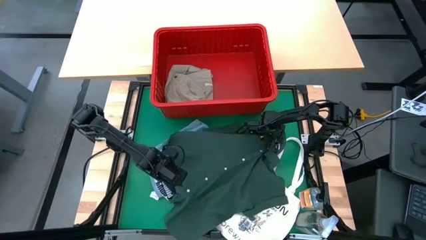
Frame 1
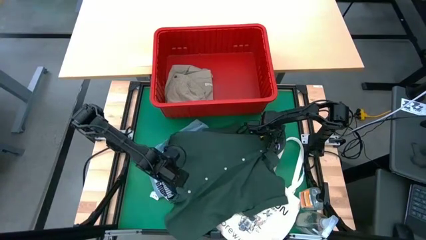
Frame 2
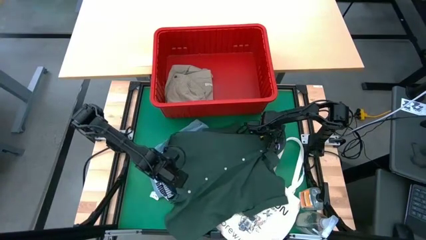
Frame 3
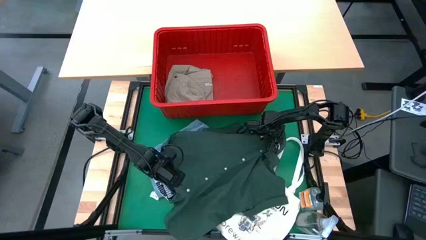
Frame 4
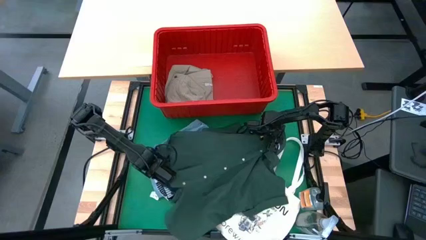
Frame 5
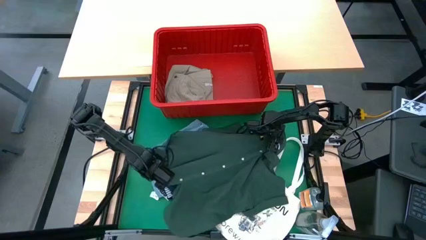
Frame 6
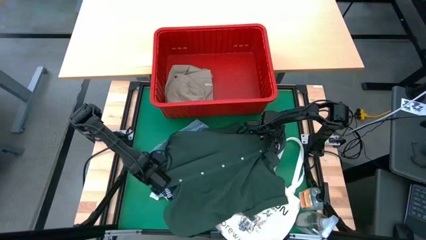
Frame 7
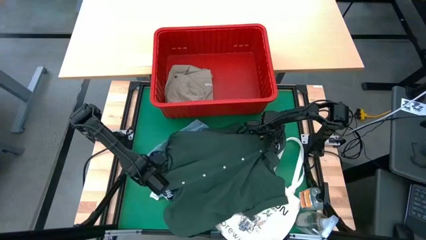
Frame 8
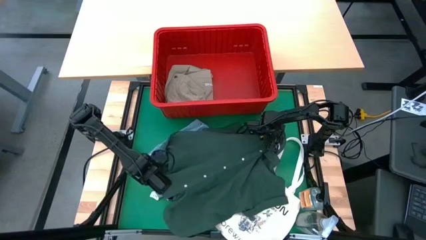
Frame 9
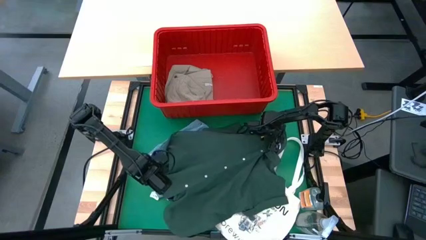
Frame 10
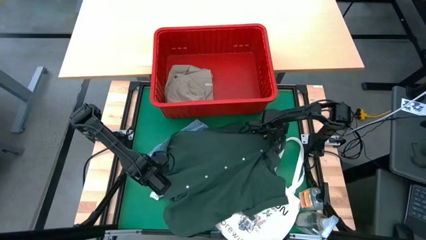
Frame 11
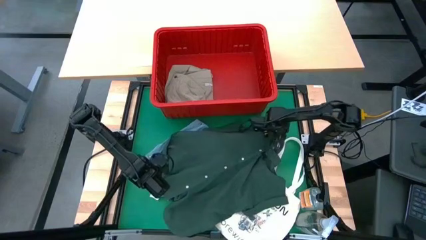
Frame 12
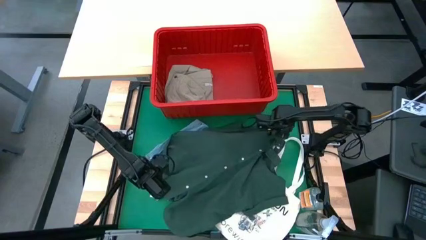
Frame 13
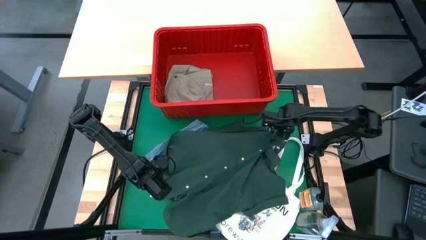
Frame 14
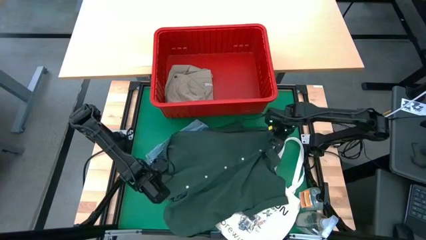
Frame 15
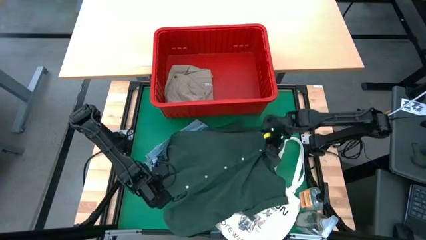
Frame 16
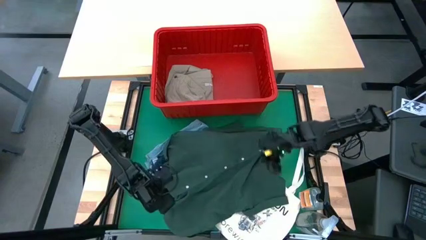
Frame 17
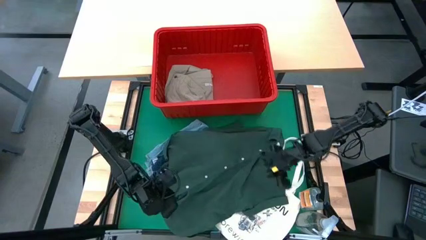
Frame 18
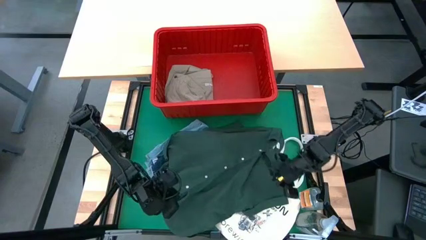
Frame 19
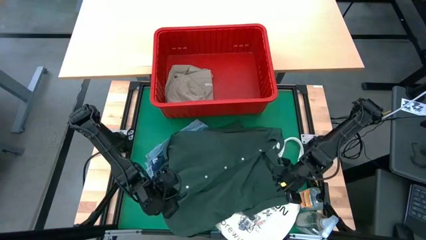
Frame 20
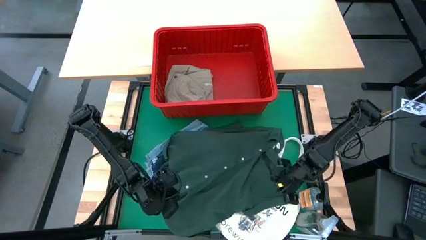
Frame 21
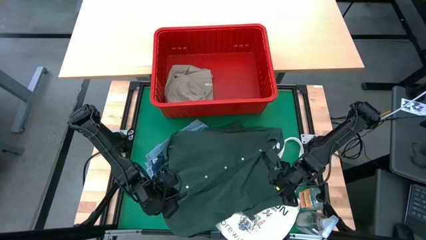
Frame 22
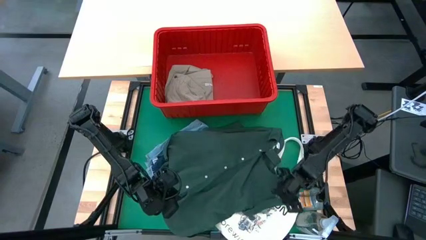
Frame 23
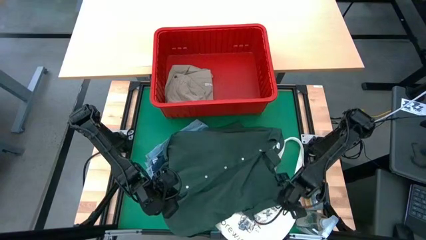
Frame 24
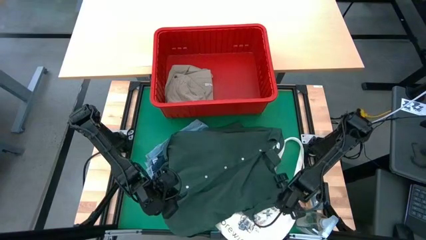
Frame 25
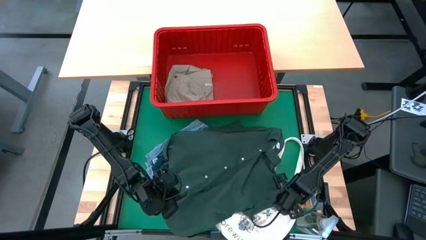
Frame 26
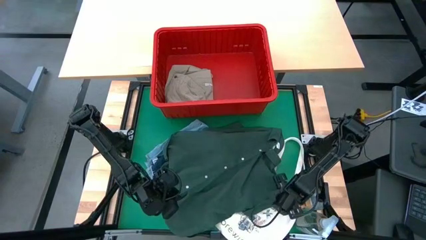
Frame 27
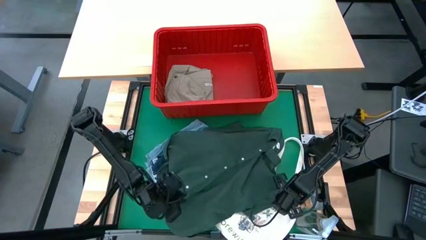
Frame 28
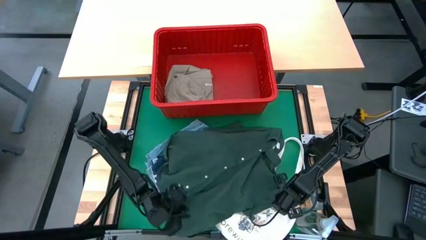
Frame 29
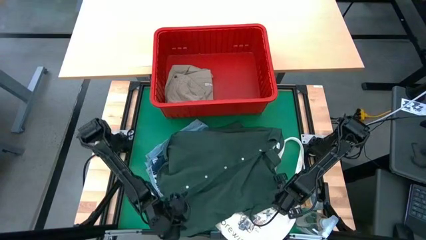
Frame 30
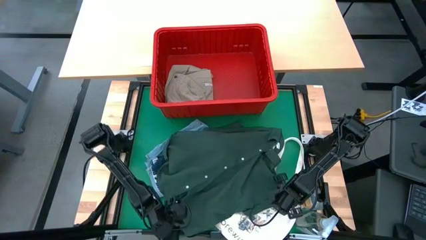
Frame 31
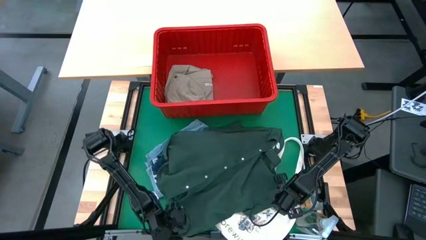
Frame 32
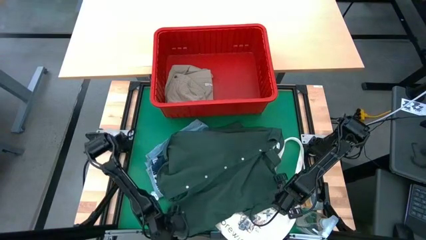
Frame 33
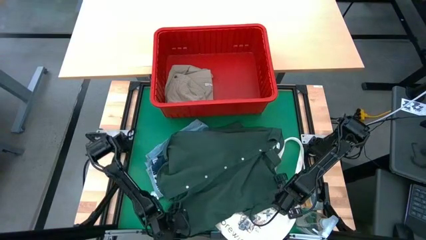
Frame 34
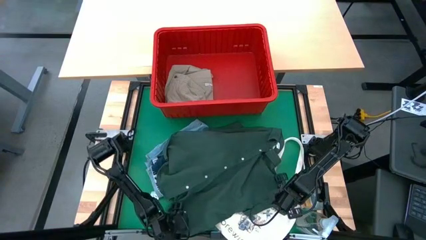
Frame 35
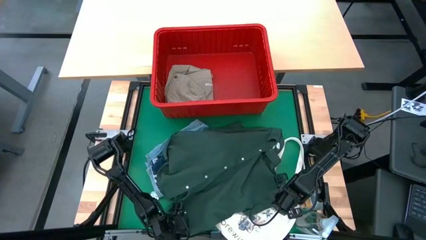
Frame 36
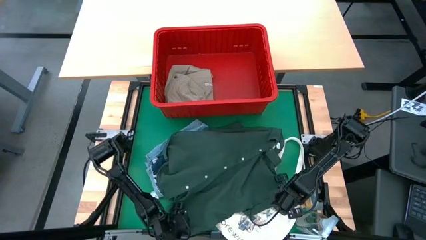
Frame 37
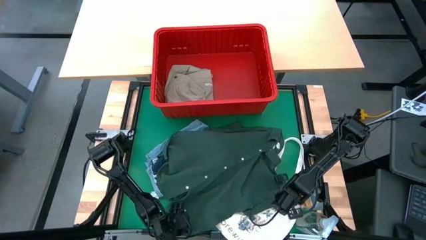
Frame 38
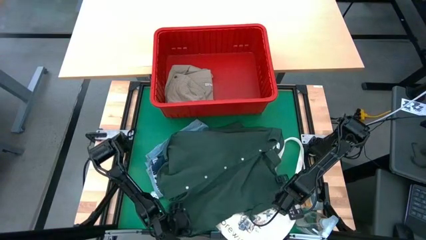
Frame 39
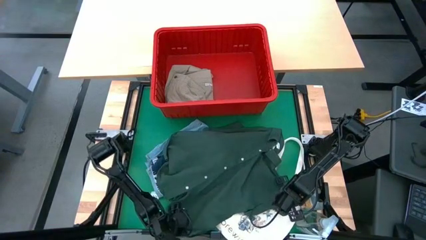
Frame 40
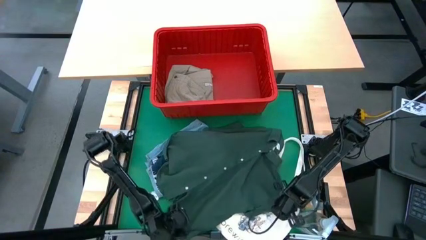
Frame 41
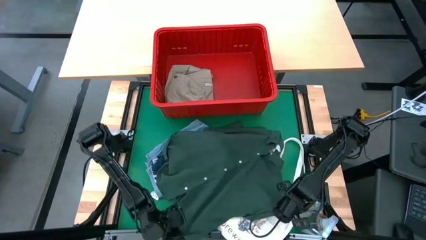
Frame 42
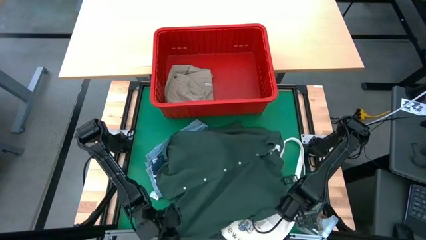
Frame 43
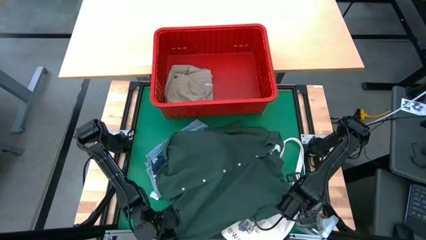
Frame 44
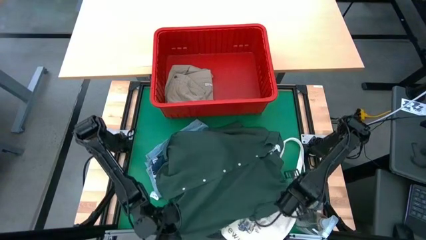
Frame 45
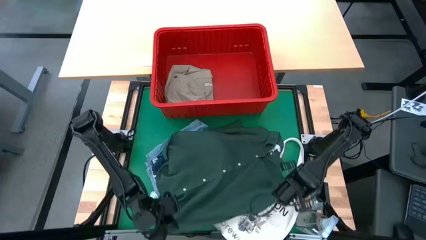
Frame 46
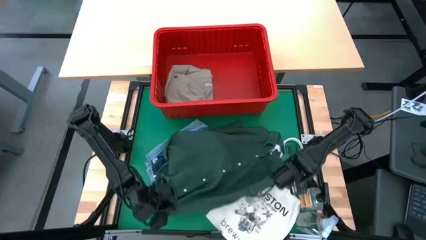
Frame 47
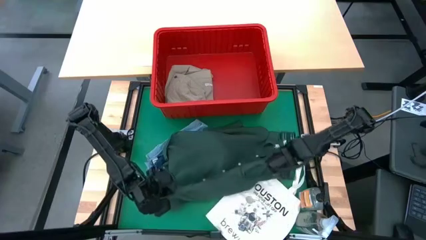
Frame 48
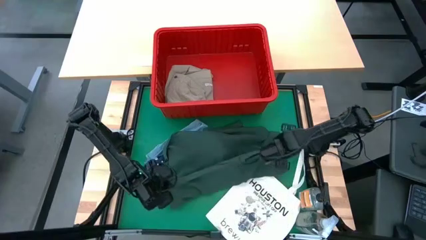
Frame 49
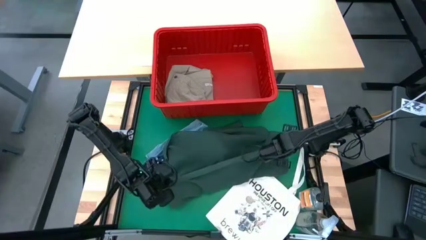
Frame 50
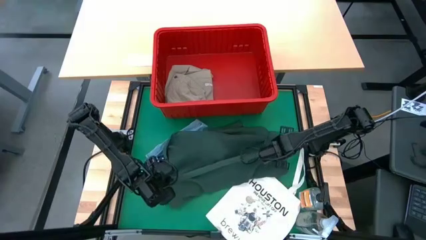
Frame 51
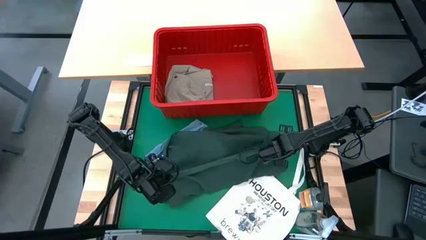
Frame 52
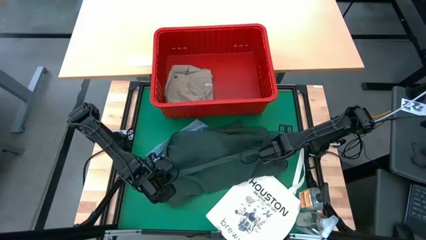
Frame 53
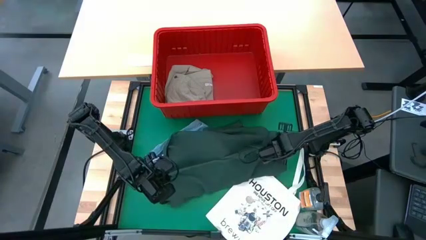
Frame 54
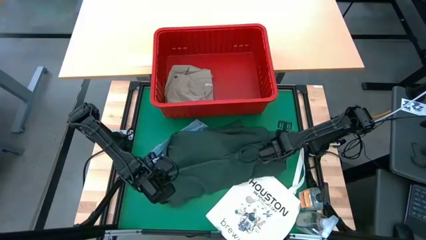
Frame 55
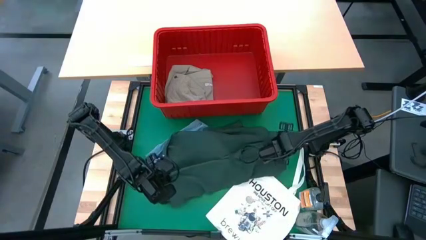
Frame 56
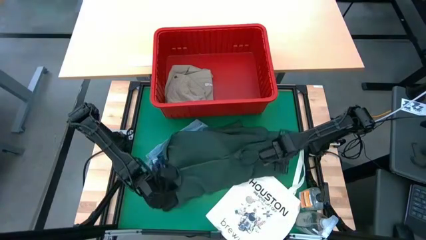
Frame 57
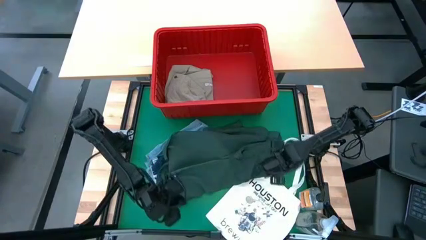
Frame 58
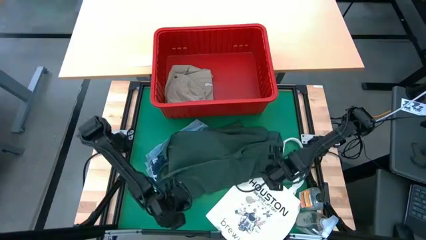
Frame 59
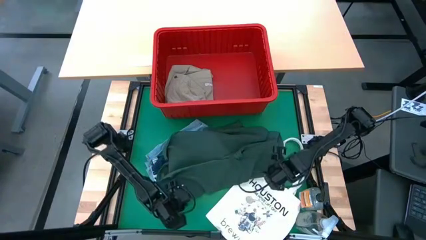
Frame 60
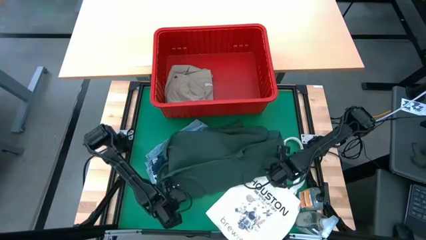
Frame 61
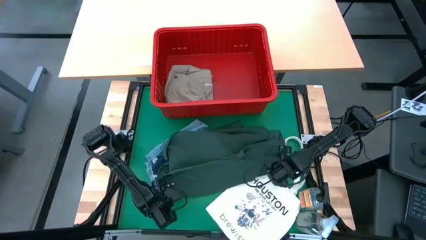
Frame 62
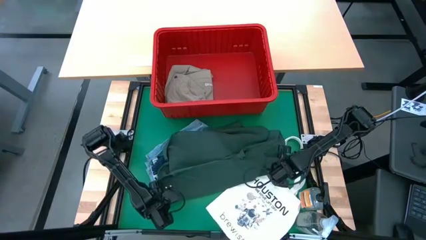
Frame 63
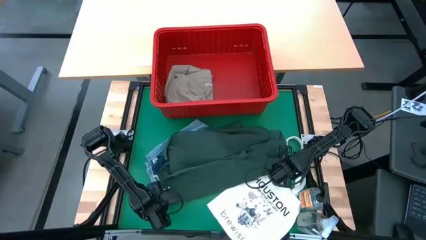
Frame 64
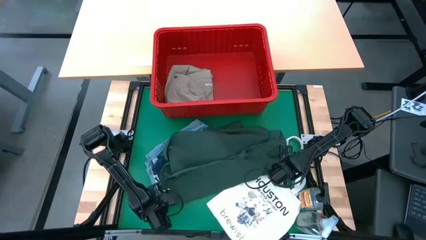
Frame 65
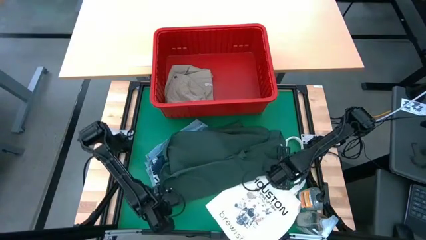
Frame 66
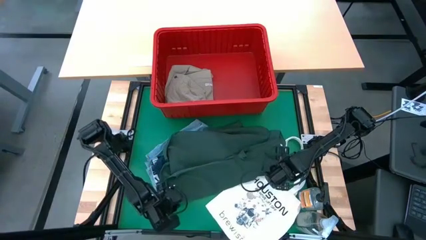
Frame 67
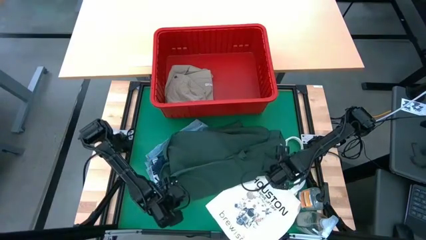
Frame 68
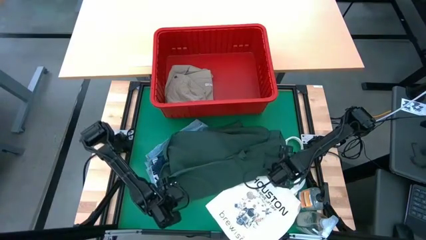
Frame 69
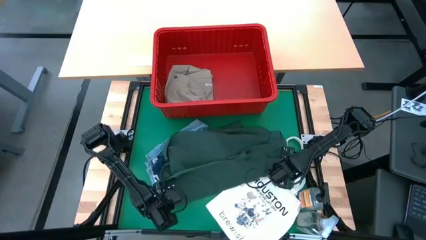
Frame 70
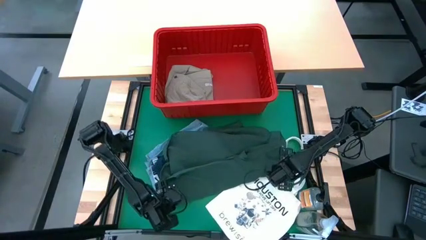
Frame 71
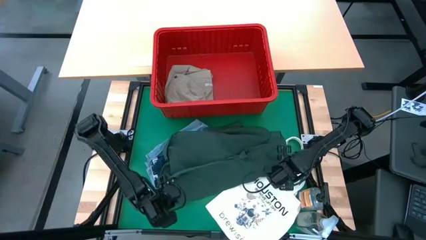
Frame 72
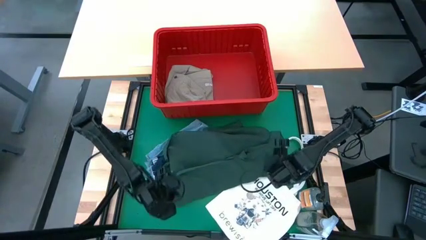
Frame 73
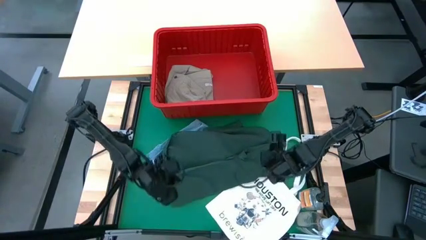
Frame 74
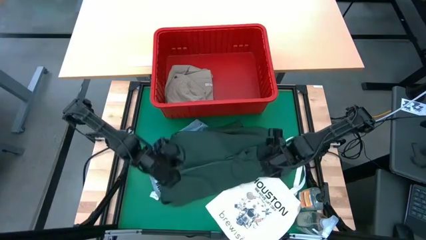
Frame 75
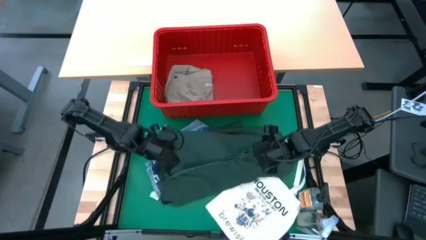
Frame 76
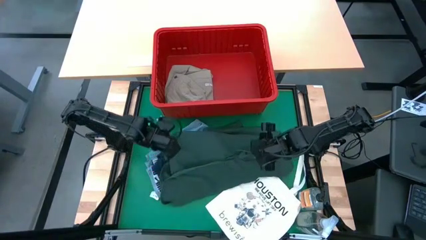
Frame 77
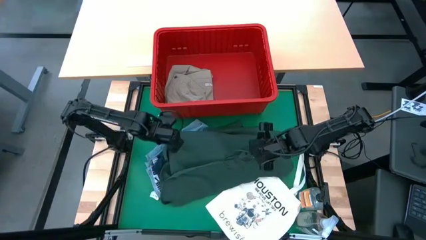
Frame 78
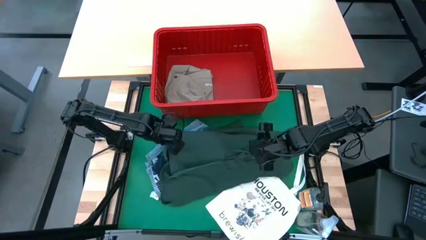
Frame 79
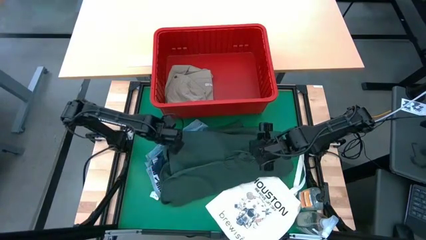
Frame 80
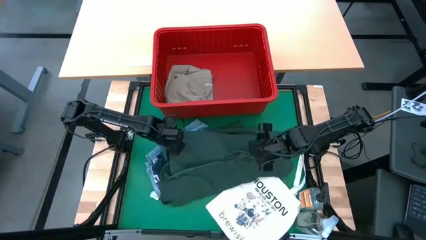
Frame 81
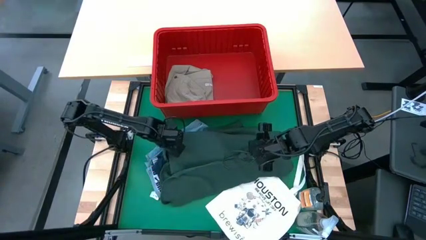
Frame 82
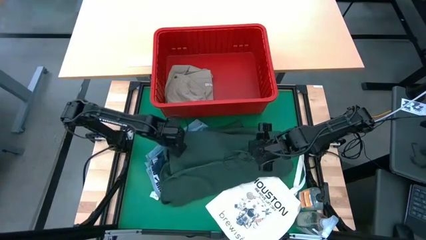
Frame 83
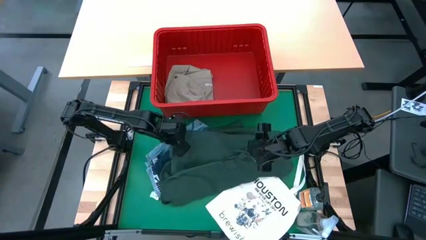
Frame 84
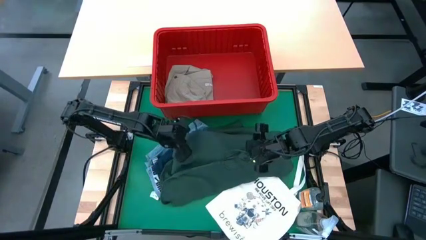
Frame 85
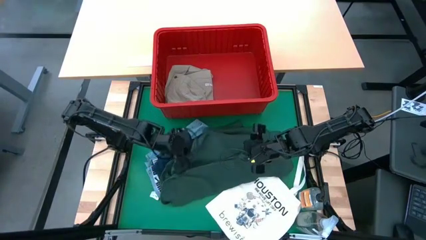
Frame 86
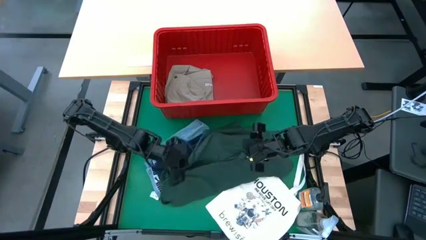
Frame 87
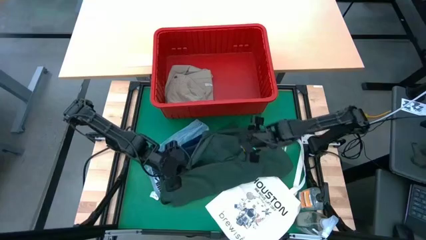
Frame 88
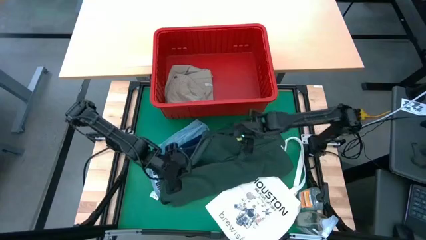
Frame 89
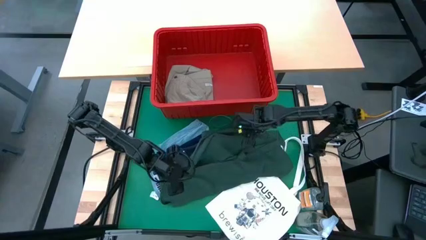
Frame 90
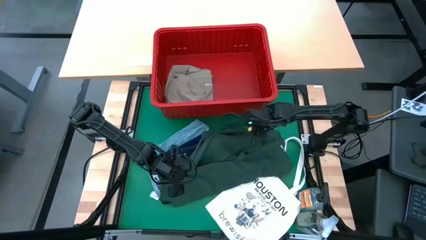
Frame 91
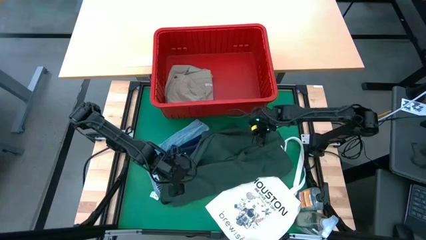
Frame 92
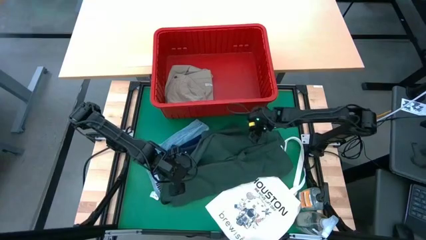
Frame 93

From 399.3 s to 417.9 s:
Task: Fold Laundry from Bin
Fold the dark green polo shirt
